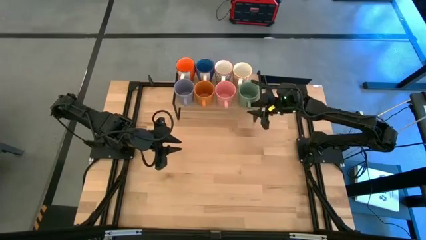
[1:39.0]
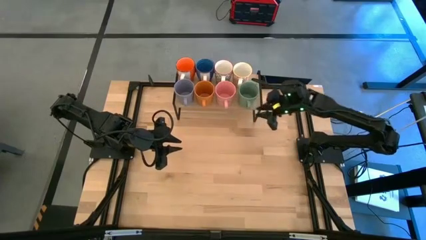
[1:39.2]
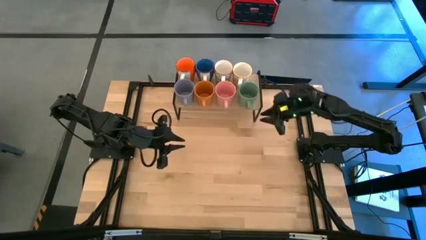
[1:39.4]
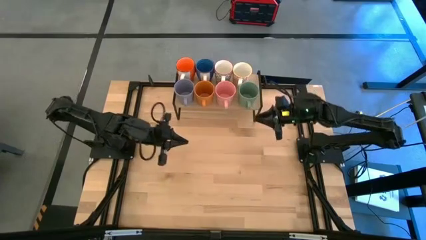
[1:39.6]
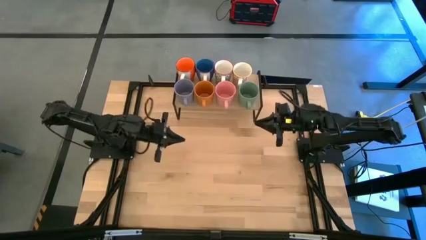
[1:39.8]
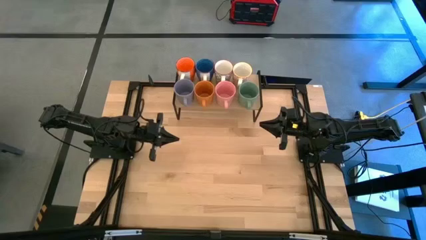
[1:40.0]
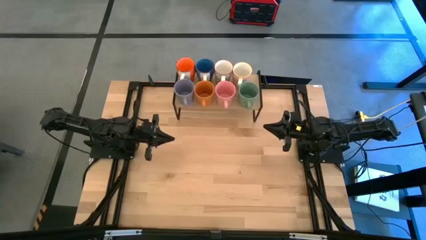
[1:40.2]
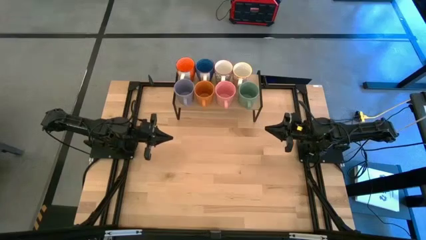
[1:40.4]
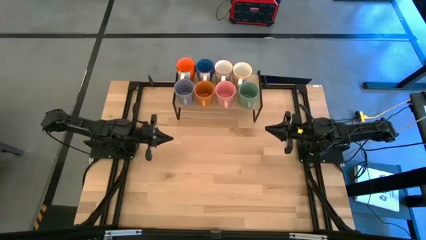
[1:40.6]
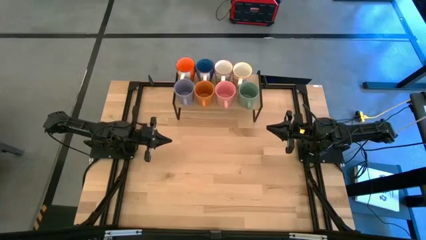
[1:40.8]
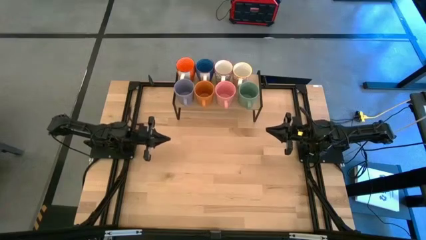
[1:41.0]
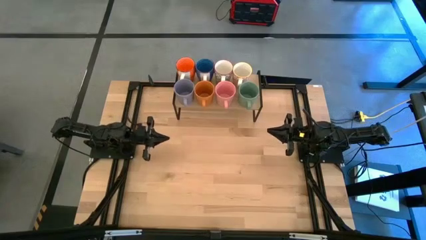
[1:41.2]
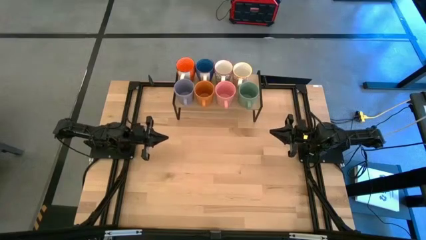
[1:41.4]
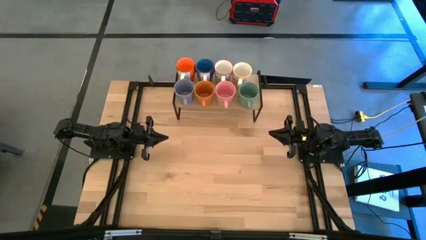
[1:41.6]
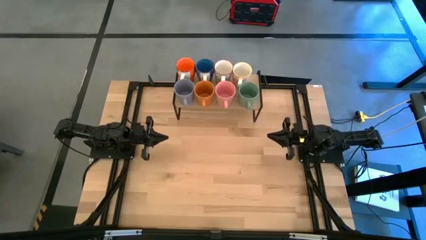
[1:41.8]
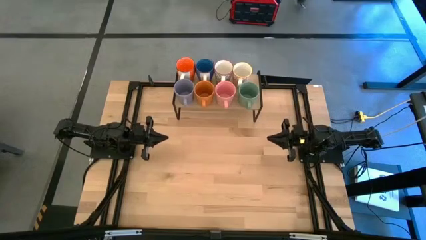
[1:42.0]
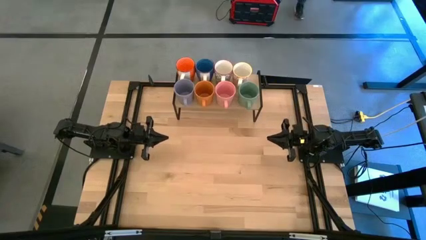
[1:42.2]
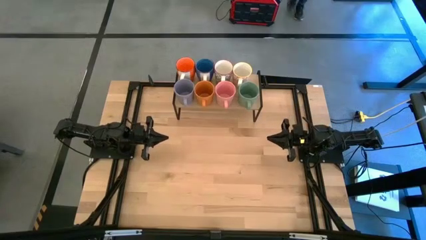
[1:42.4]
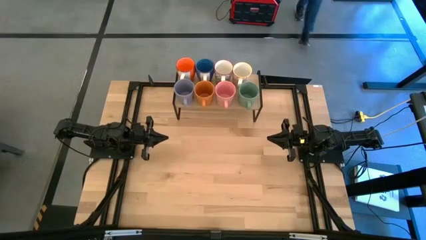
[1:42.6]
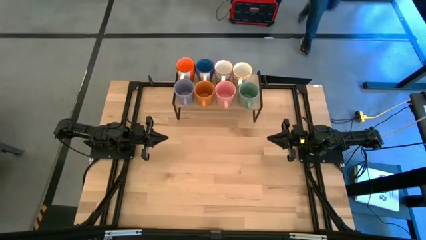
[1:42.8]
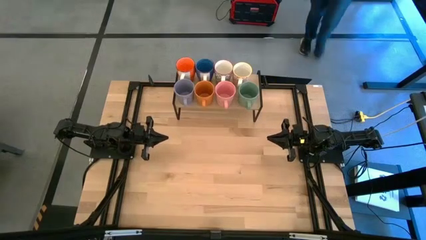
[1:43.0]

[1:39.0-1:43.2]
Task: Place coffee mugs
Return to Home Position

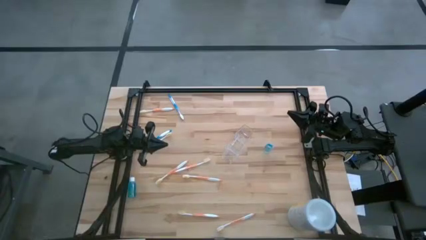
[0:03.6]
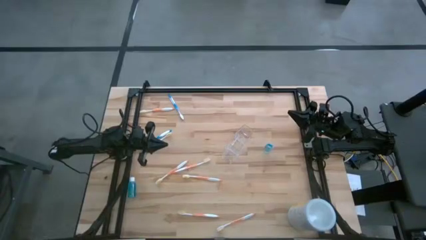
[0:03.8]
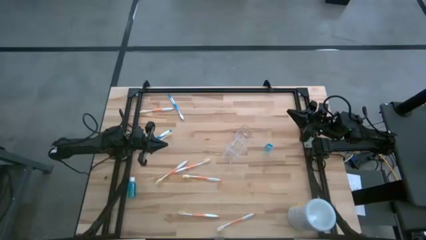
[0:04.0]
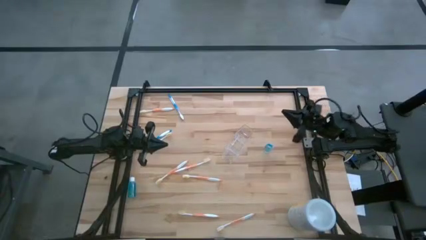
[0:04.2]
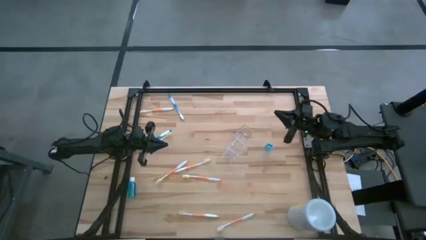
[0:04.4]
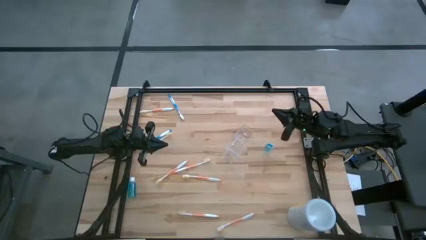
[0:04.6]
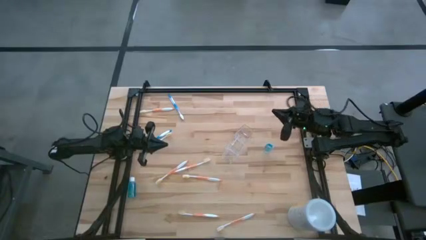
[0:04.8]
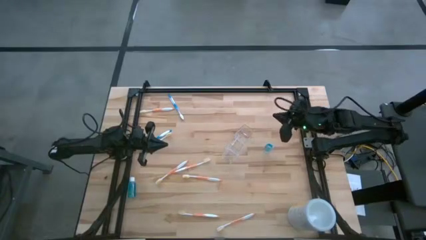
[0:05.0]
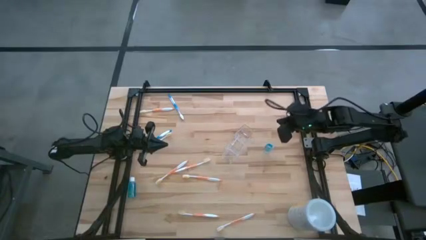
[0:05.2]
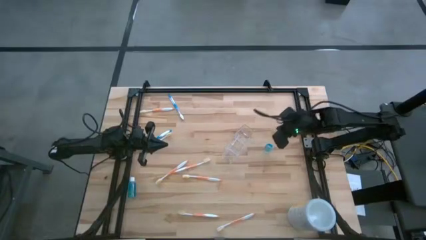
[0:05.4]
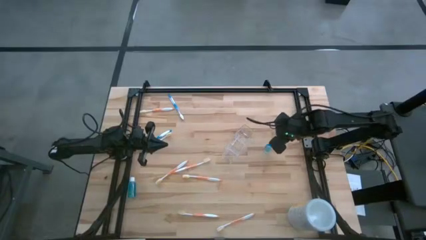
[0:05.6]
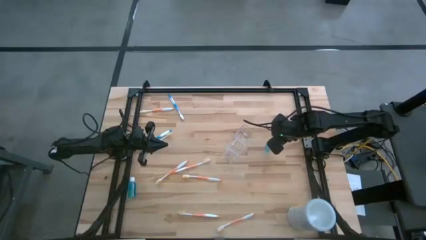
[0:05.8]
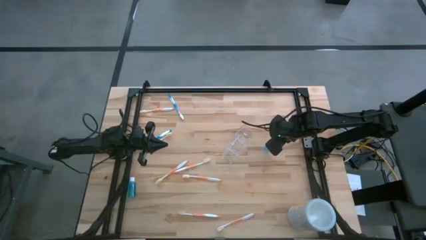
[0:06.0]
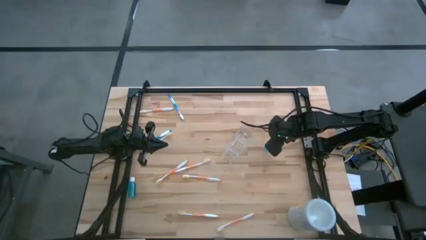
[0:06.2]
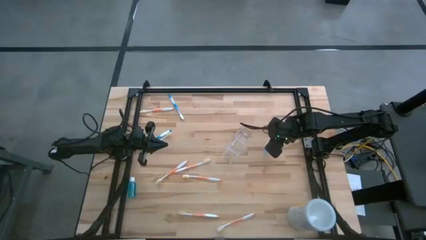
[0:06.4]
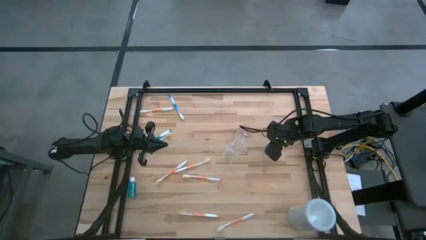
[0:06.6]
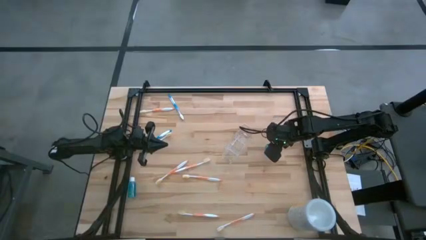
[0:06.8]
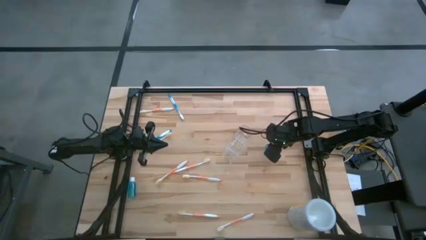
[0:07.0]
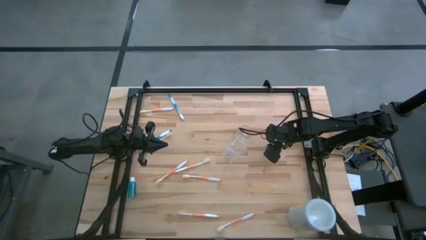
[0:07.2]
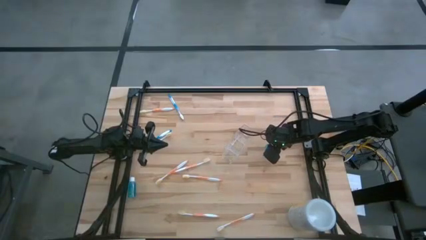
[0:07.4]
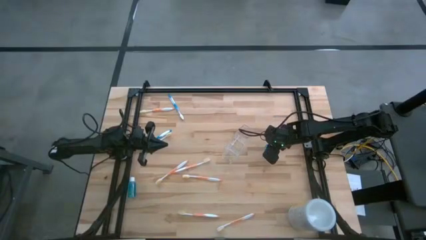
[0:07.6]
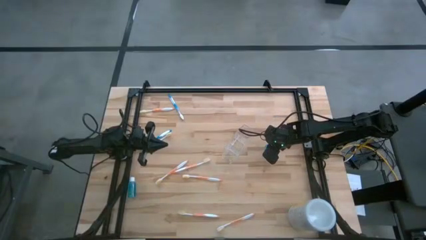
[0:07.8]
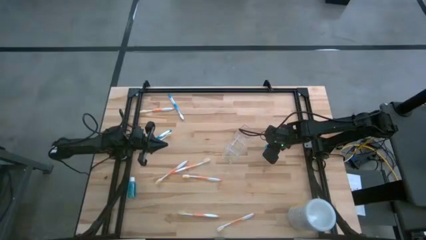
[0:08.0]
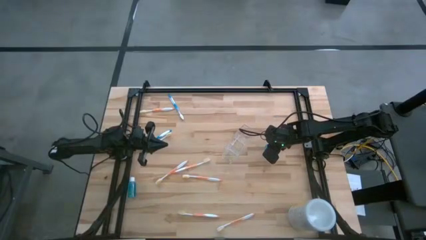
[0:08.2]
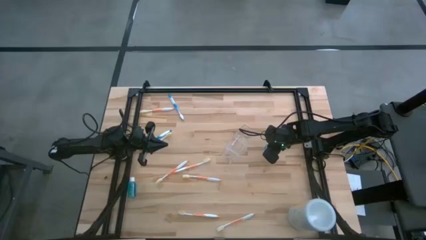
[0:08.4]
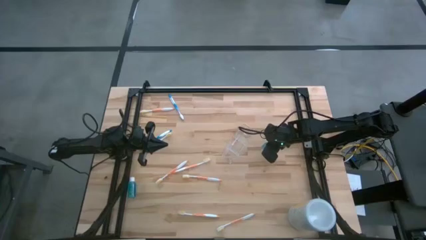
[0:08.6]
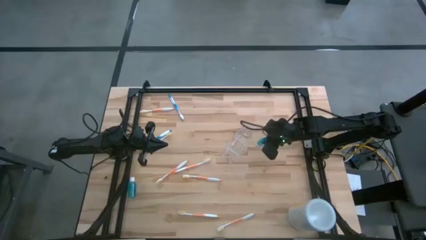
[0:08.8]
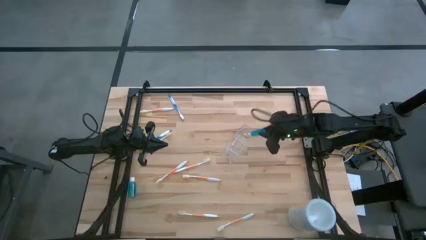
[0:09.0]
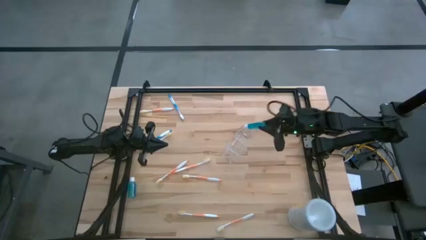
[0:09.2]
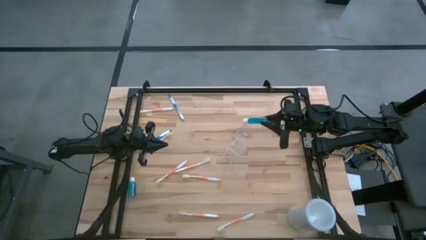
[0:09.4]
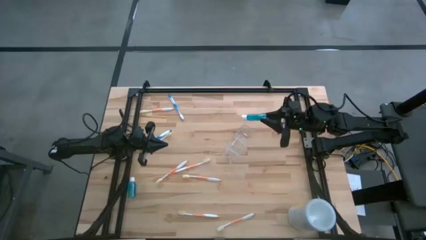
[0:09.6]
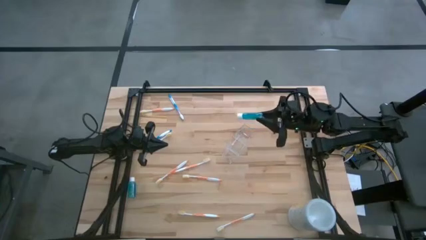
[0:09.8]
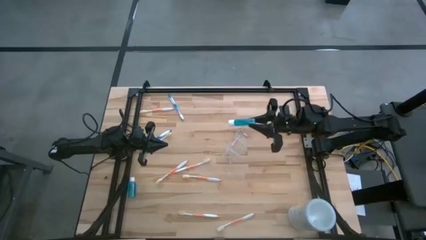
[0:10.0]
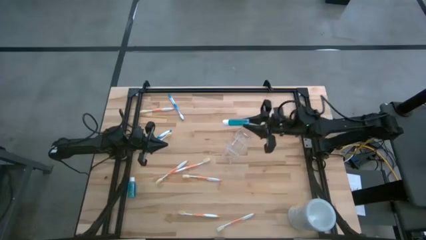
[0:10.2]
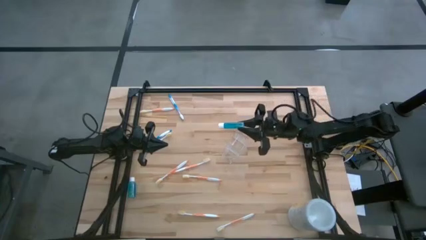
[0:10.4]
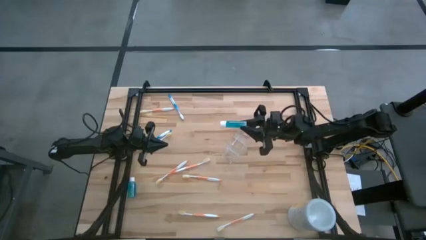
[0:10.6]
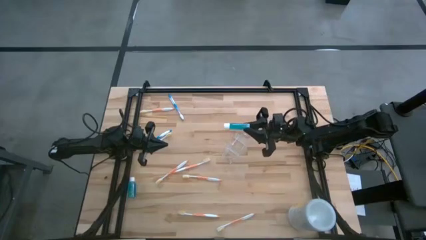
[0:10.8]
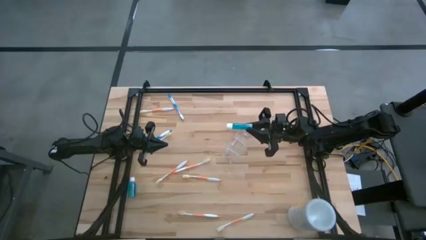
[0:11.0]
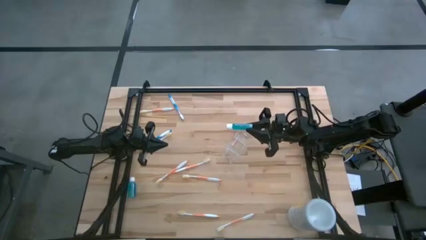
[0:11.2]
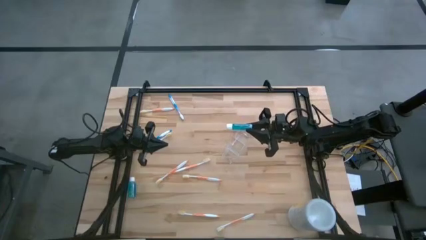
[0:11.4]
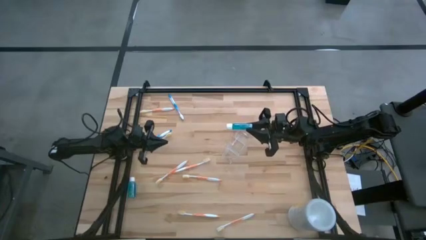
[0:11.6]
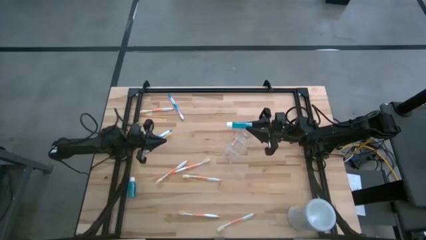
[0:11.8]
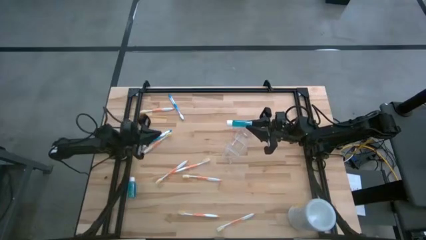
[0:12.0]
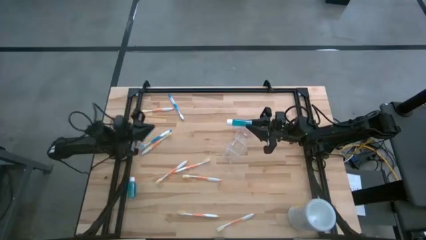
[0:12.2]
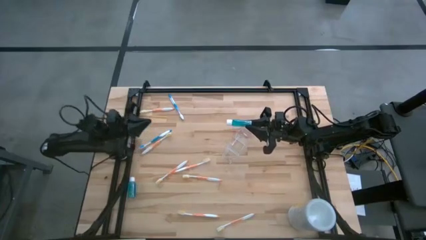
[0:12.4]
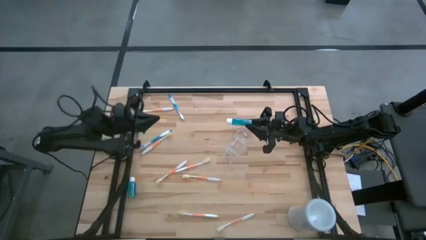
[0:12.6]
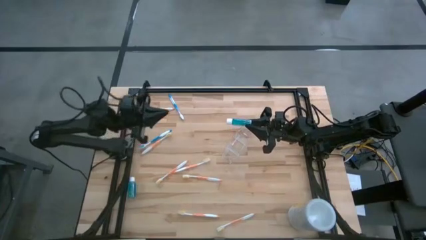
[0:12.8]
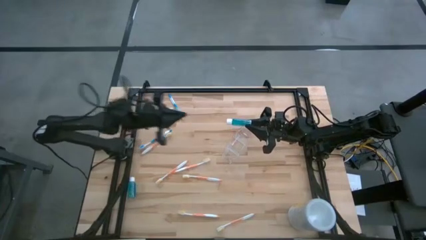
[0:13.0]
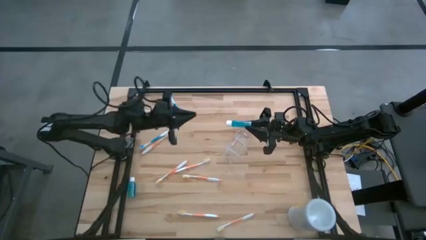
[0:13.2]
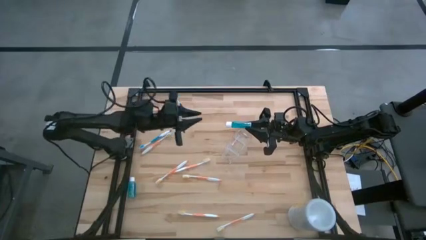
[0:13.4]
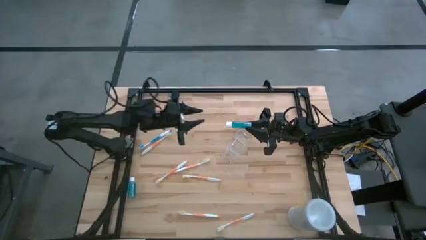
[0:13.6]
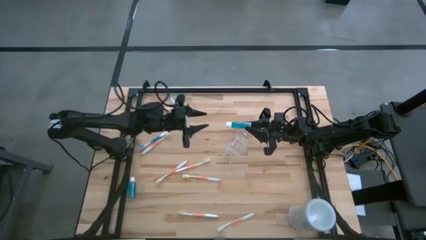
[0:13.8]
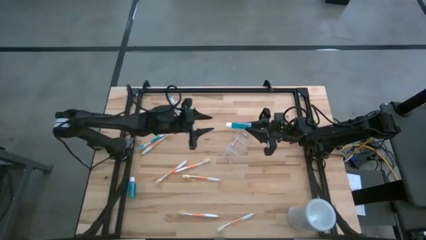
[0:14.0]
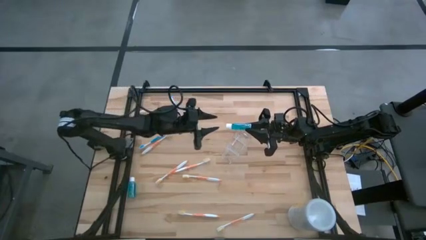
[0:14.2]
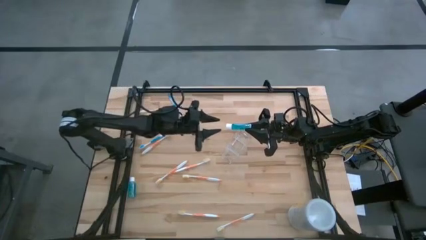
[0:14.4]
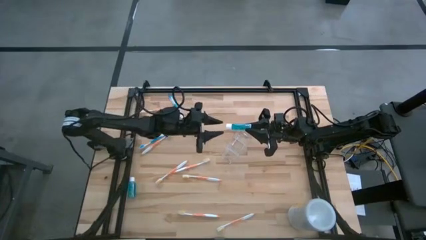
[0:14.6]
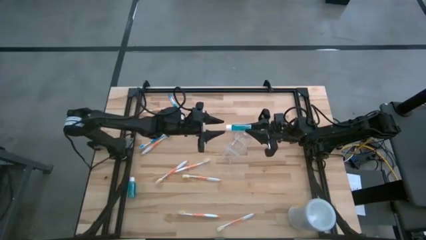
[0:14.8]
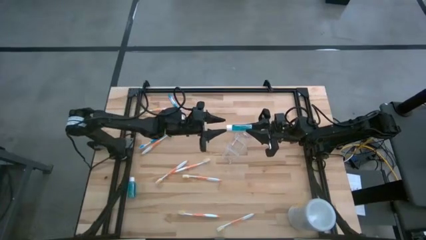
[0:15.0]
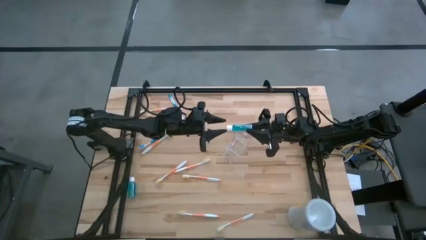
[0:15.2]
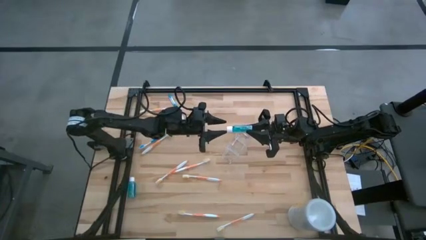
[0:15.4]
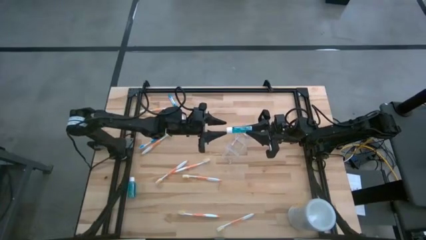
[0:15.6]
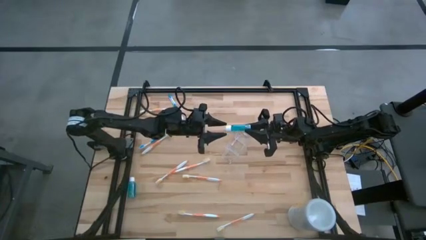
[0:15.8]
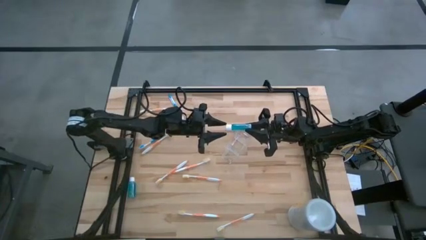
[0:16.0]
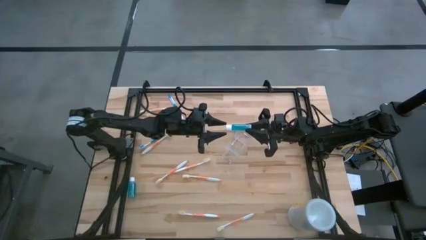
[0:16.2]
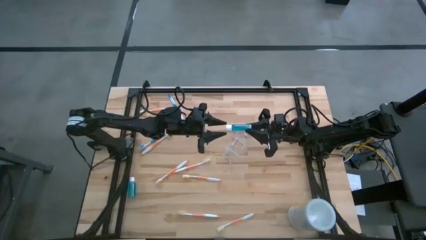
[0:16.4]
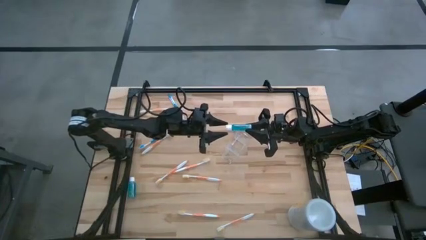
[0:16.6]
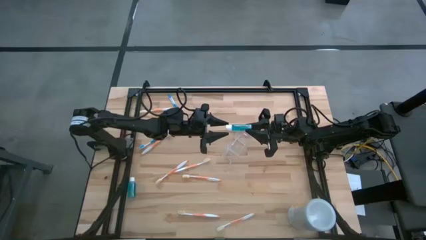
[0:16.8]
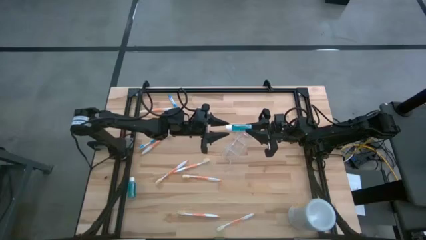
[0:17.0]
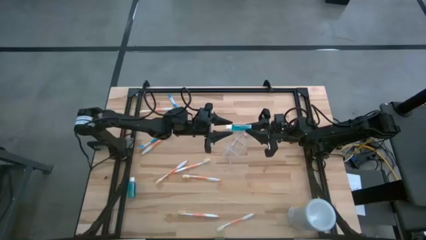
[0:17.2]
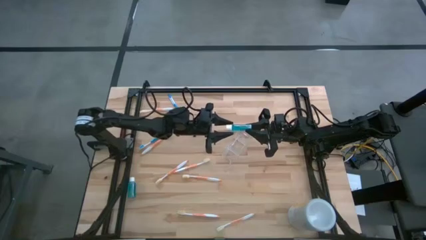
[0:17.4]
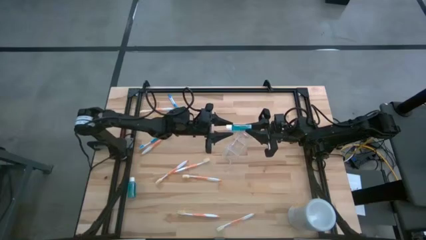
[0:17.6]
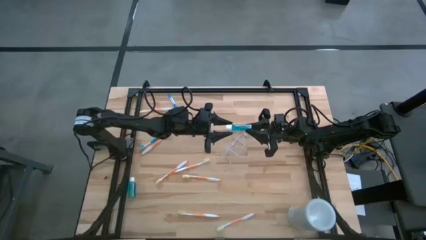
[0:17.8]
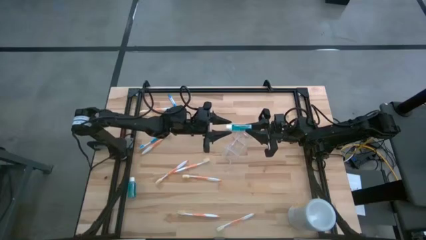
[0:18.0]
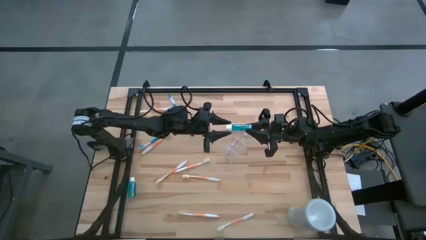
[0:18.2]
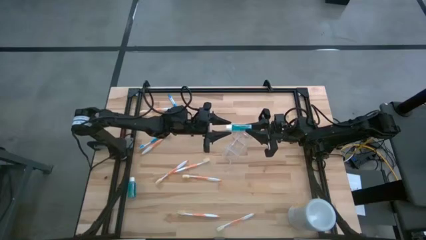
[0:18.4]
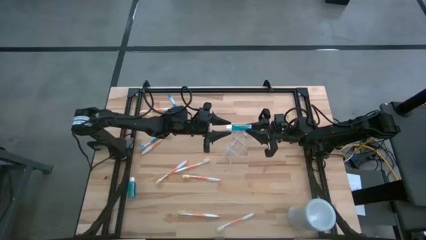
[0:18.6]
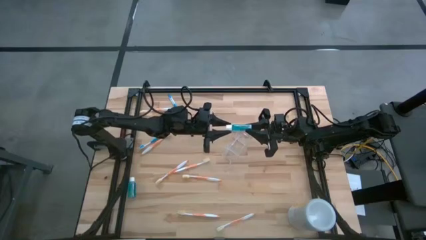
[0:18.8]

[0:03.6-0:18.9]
Task: Pick & Place toothbrushing station
Put the mouthwash bottle into the transparent organizer
